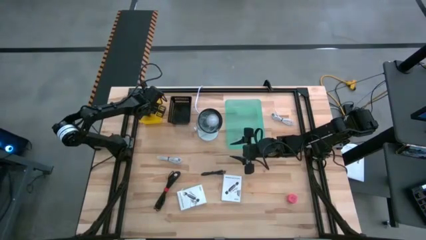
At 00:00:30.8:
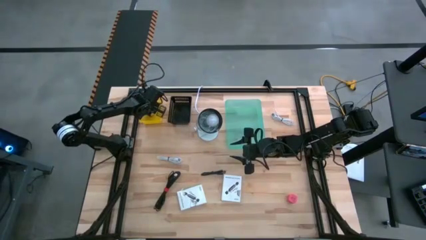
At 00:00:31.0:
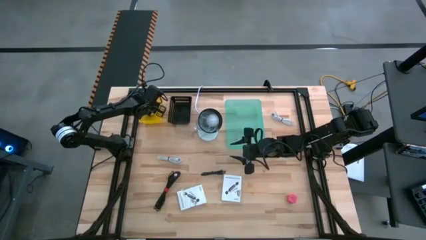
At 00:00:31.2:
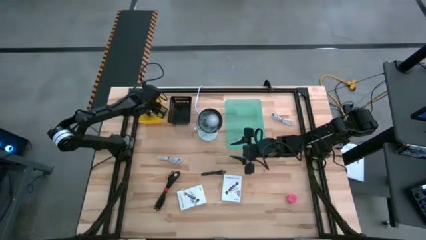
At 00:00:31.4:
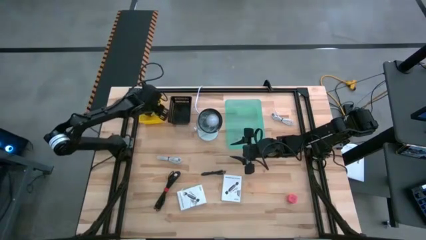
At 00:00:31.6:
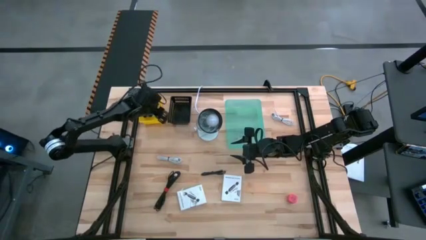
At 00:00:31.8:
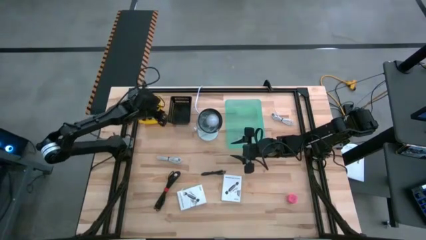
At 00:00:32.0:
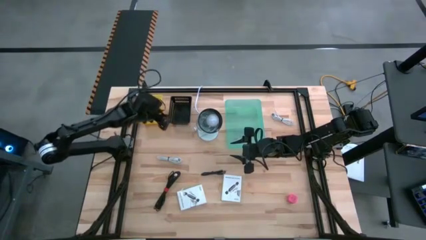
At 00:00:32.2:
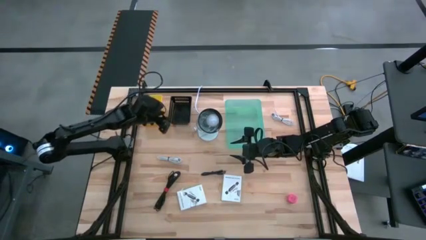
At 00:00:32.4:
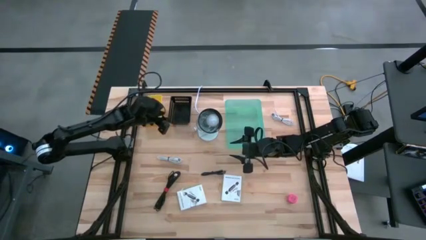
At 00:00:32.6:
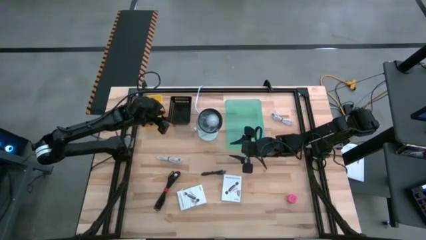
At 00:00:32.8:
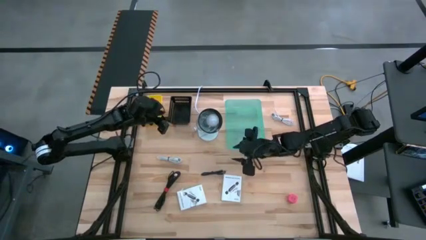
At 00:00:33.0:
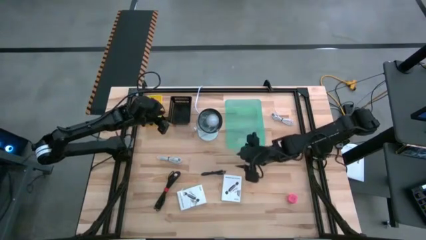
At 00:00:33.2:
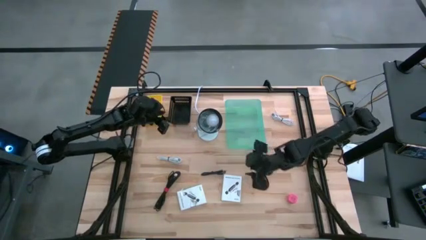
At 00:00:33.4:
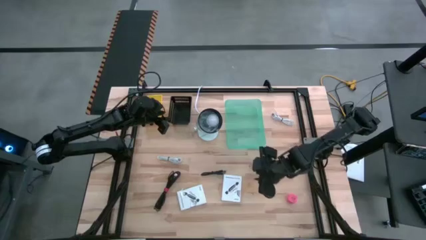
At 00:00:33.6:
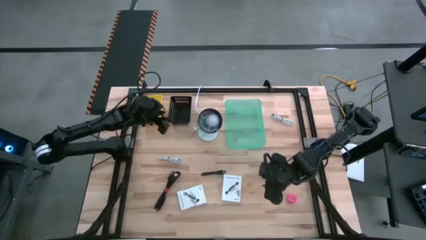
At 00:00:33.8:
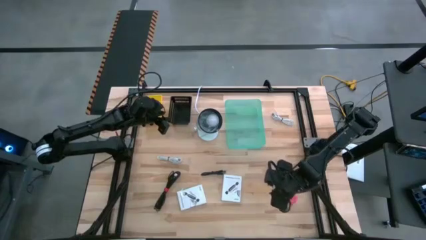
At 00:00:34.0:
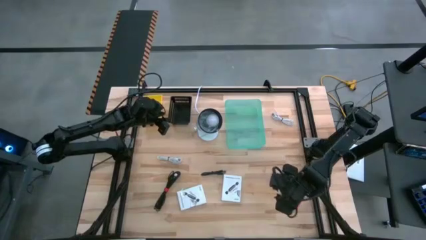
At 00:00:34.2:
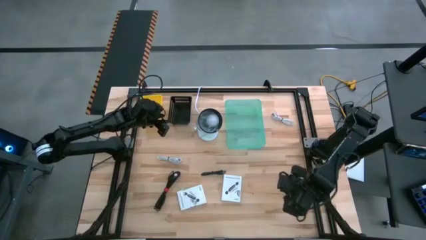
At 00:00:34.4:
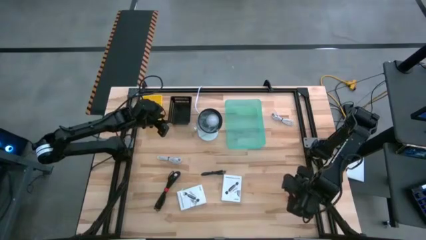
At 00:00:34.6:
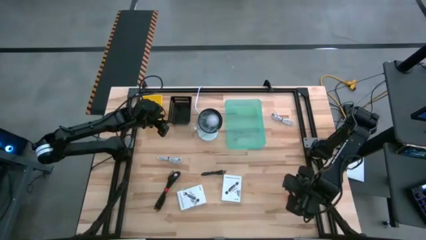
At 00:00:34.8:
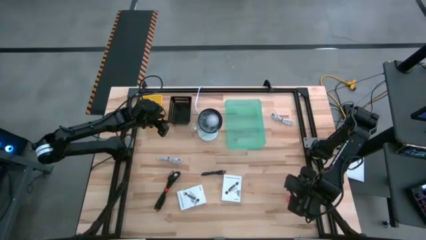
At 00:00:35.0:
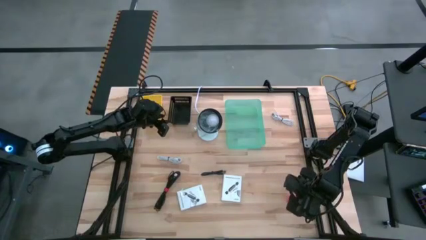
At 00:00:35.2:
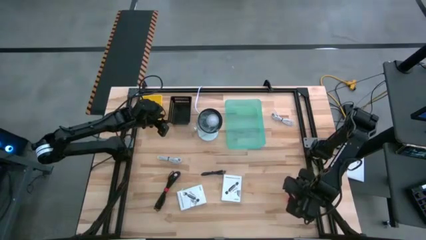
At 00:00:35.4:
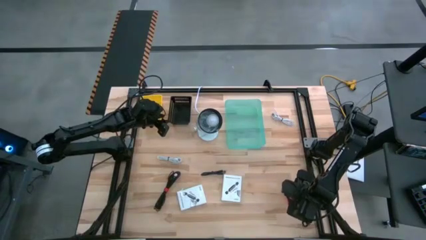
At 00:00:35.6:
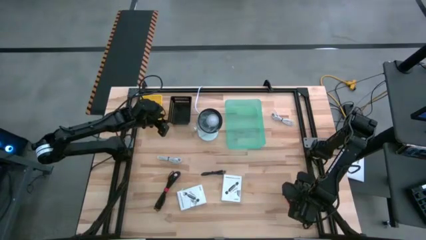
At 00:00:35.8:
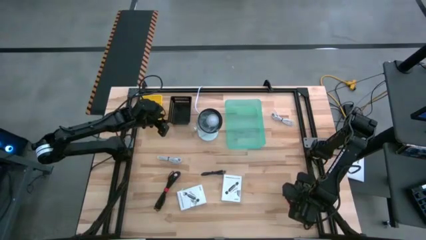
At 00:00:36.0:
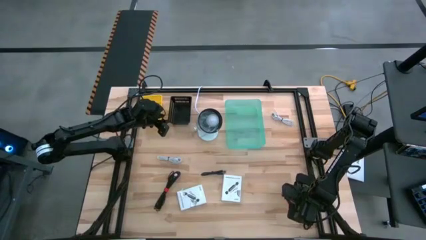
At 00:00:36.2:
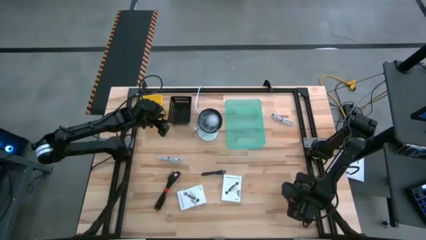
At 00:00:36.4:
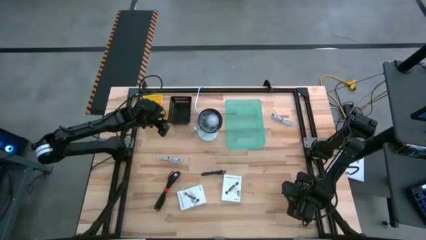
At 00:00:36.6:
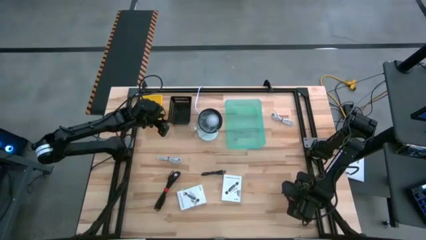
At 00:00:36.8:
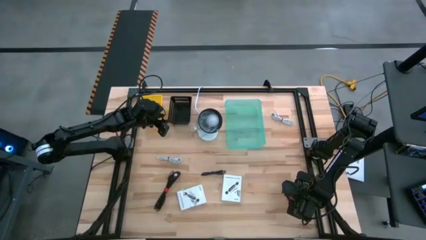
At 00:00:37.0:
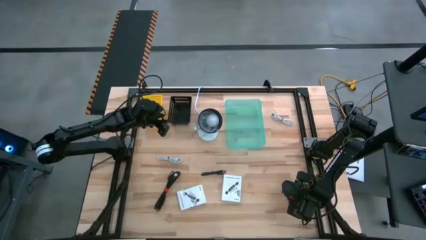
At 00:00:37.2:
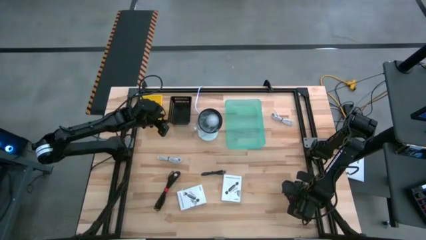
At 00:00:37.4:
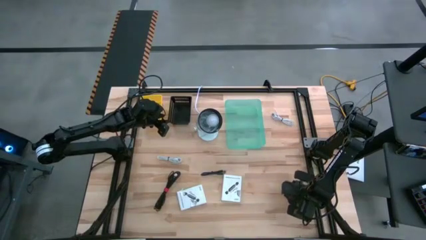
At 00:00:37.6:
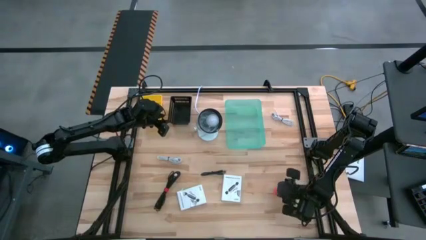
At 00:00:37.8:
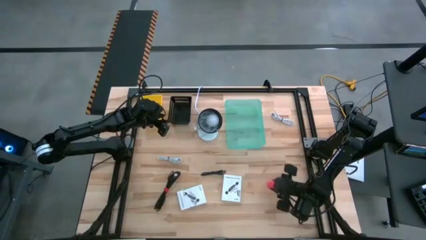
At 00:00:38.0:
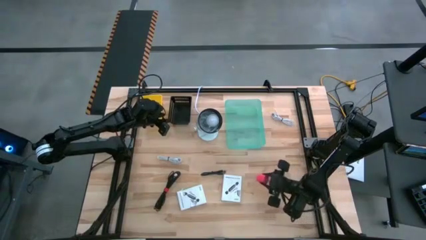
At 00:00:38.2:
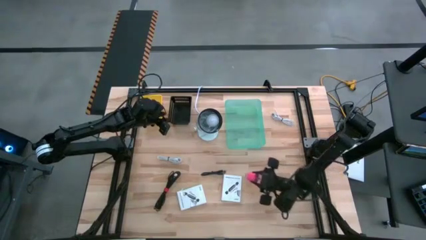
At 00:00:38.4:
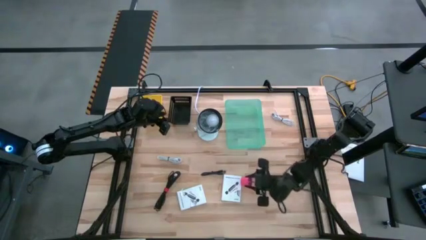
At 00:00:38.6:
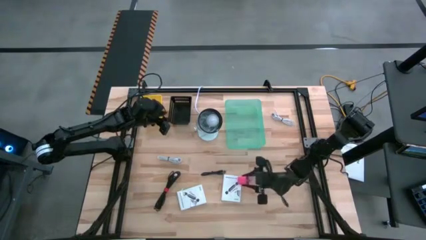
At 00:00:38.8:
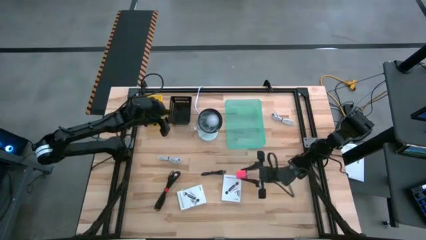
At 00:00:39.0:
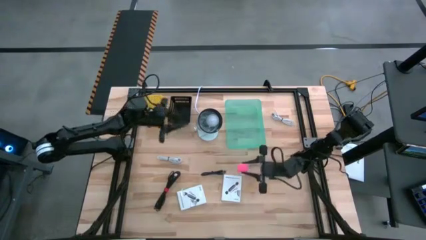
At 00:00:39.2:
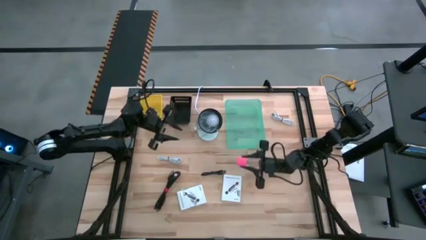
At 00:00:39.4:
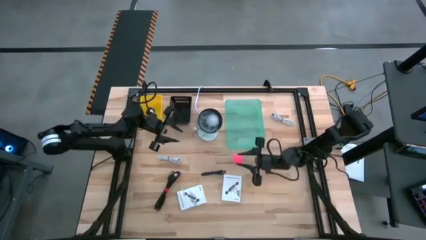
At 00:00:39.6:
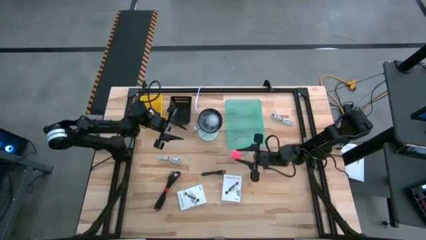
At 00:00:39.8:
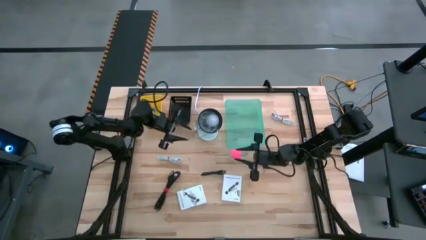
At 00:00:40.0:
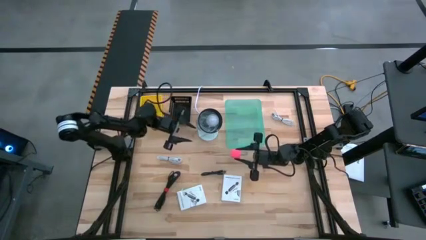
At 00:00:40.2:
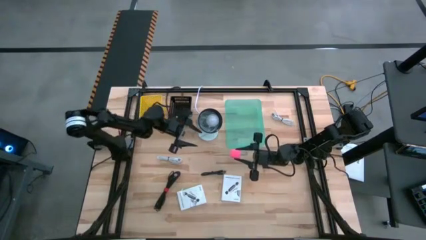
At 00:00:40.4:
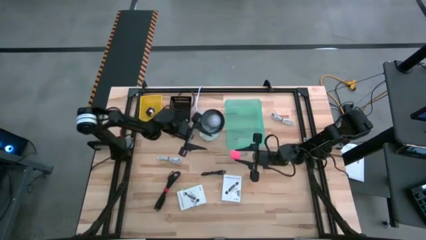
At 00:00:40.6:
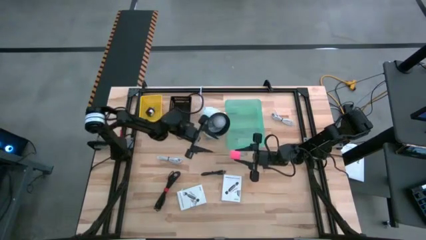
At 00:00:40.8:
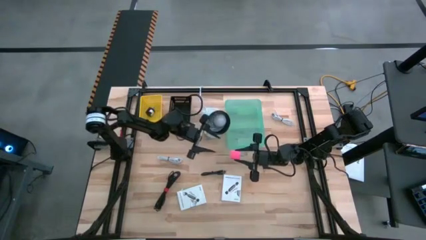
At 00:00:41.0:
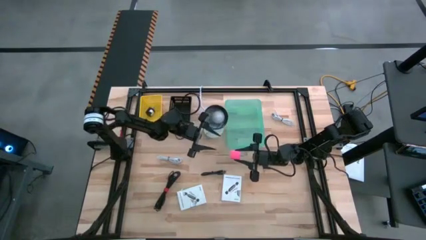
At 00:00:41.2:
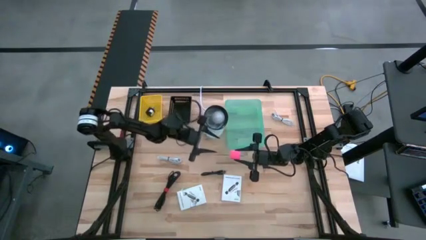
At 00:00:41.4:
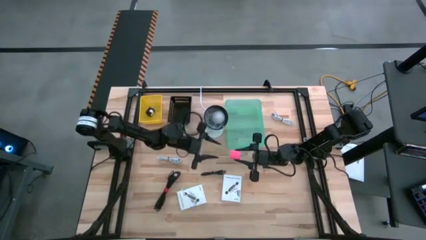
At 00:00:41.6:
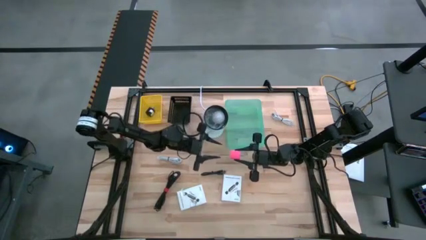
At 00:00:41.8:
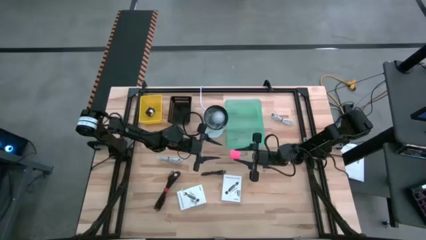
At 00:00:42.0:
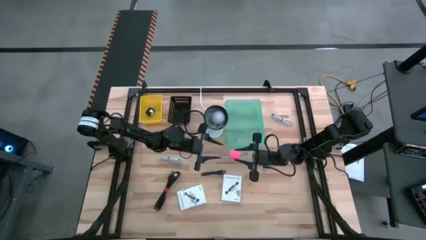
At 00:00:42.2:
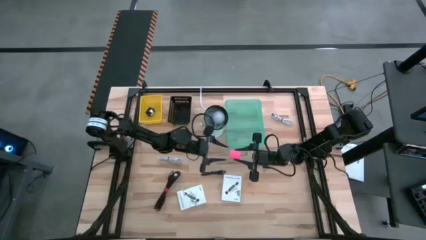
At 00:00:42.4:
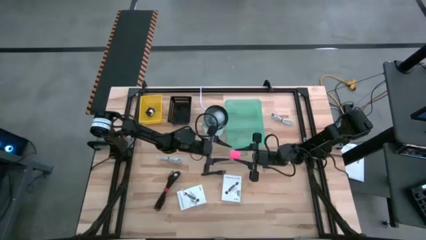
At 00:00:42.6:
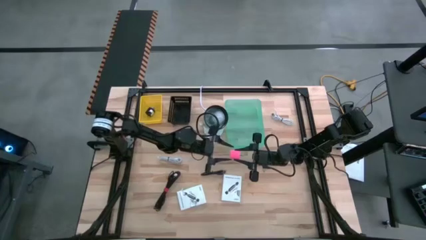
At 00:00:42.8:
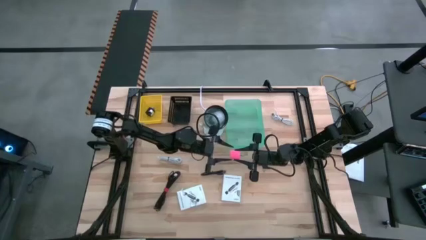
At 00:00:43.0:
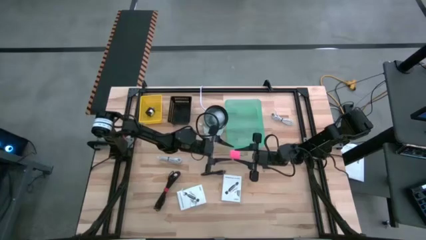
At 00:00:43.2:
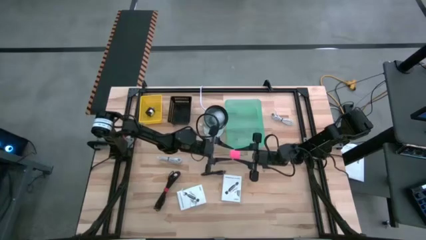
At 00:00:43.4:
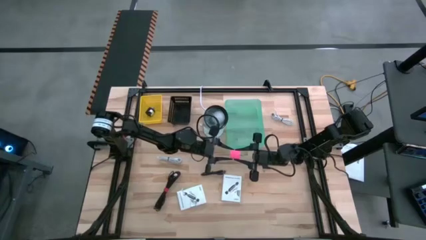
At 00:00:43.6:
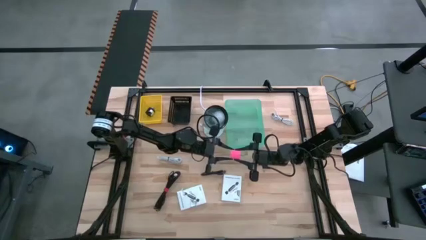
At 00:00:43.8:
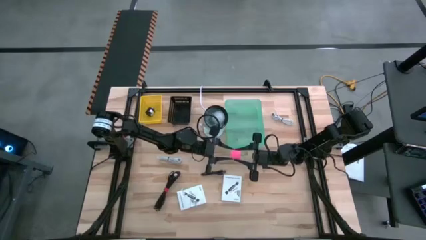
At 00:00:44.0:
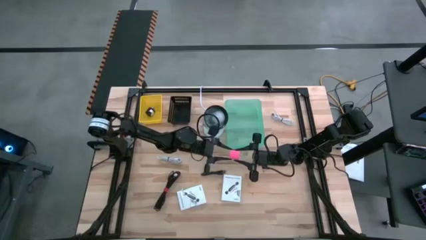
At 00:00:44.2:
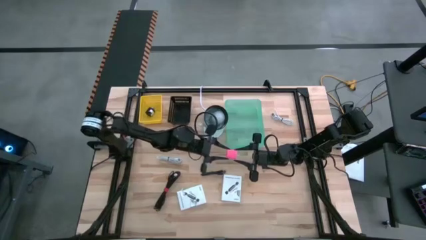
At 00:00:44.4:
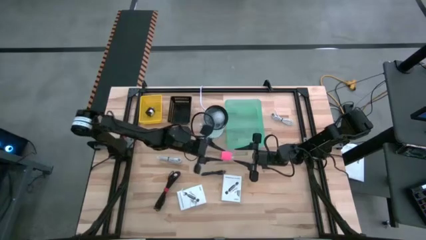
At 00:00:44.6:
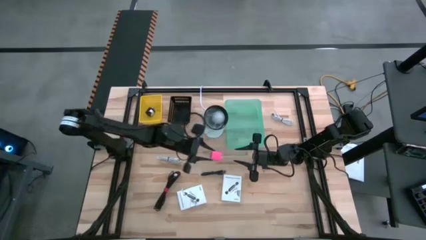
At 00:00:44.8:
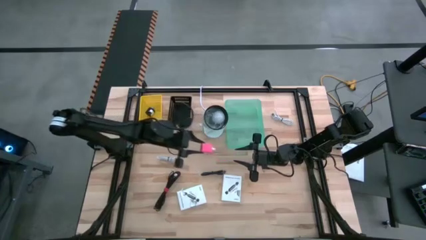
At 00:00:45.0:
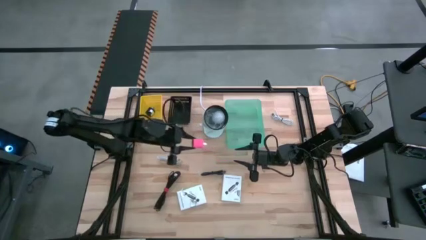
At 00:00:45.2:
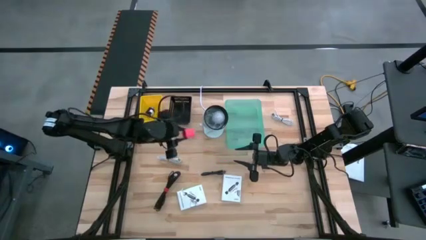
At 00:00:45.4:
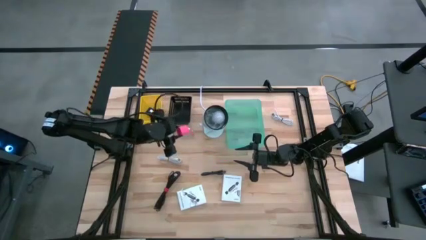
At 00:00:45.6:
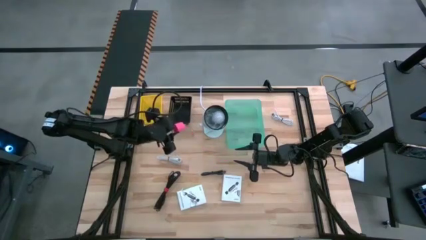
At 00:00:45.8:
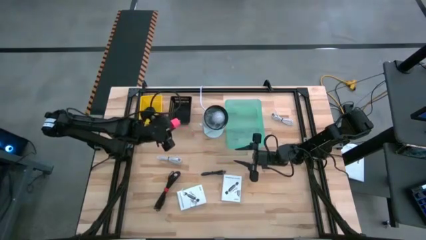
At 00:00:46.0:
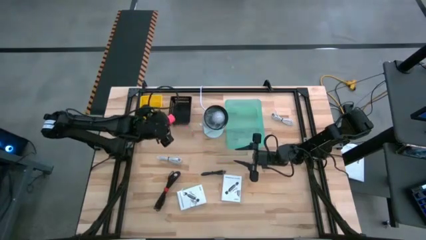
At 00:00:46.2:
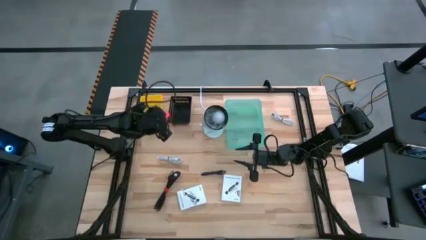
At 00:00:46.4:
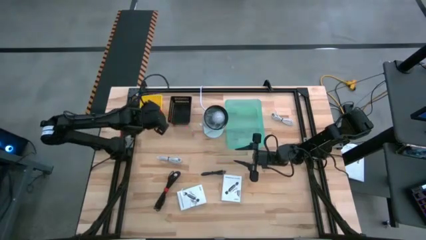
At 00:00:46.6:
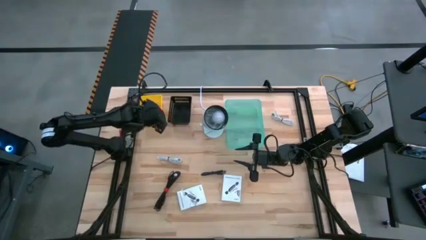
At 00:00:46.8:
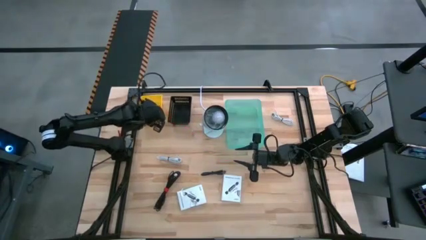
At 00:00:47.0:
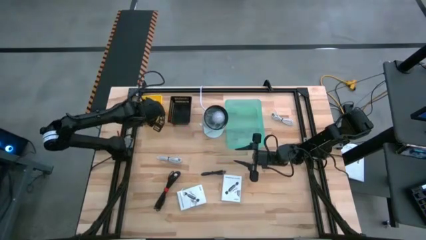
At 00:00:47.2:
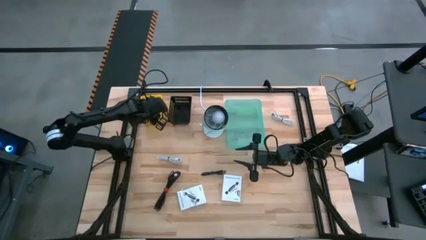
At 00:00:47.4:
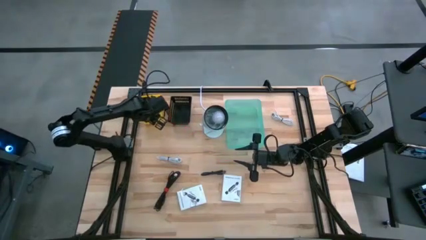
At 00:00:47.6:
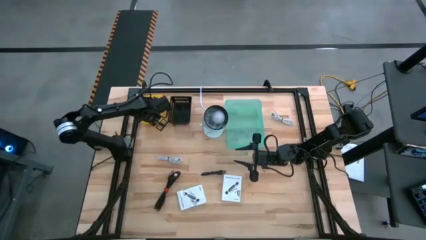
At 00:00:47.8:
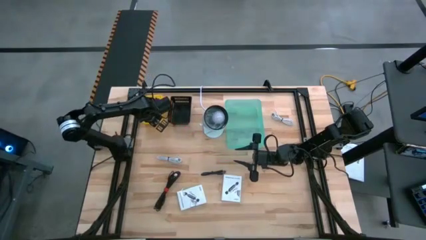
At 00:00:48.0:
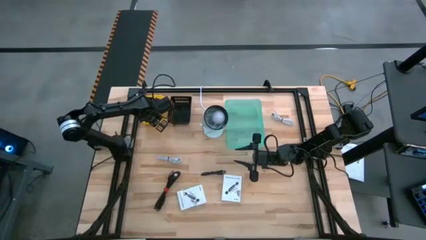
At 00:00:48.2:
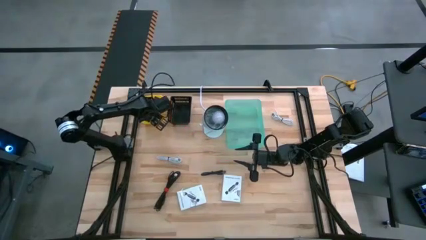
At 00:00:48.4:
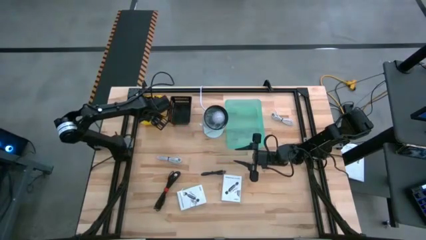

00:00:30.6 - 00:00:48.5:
Task: Pick and place items into bin
Put the pink charger adapter into the yellow bin
